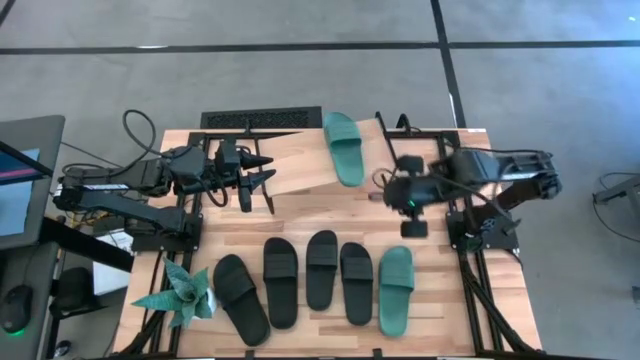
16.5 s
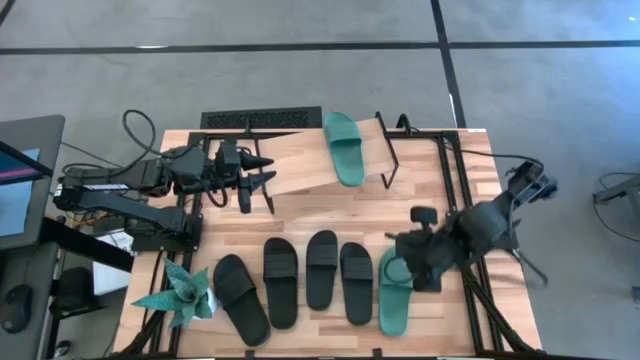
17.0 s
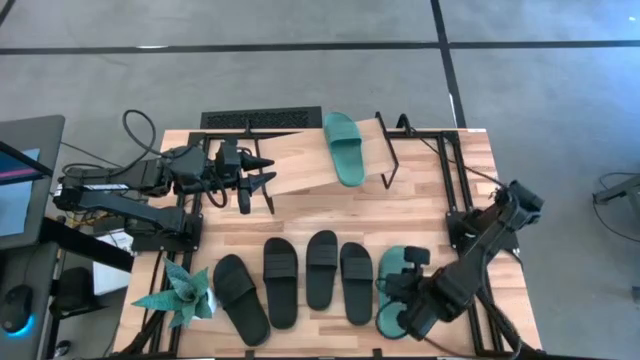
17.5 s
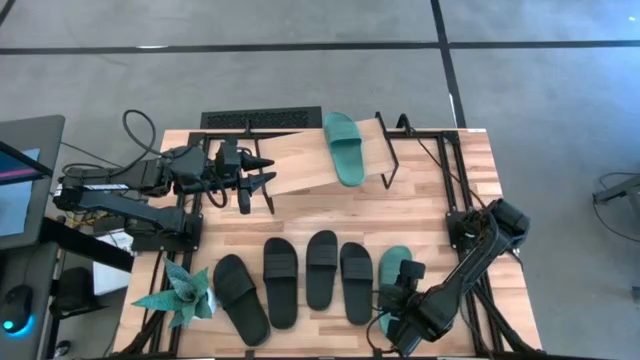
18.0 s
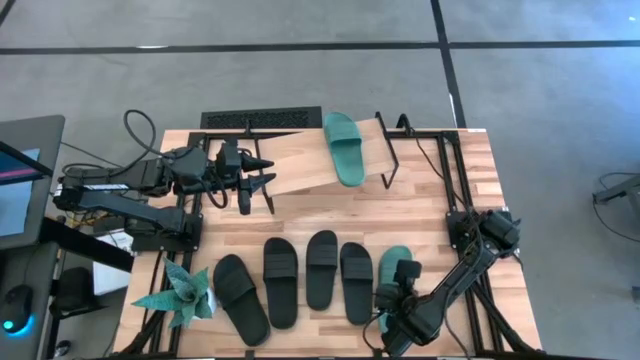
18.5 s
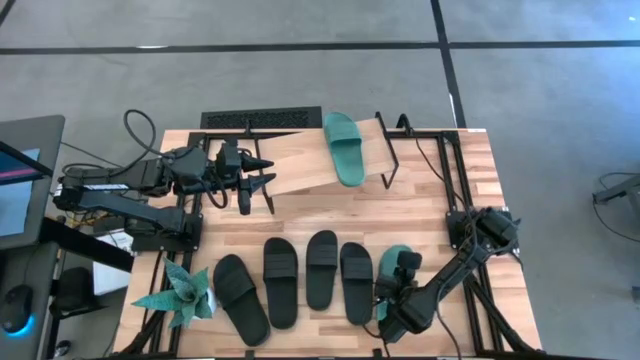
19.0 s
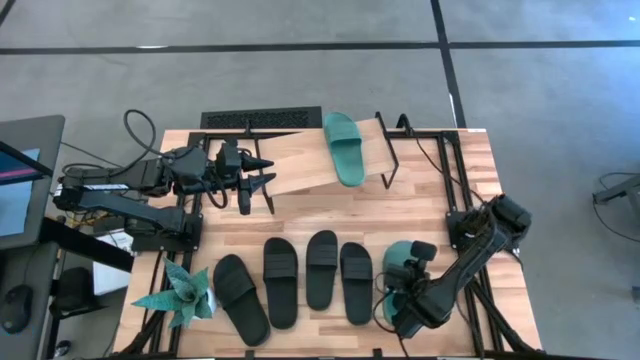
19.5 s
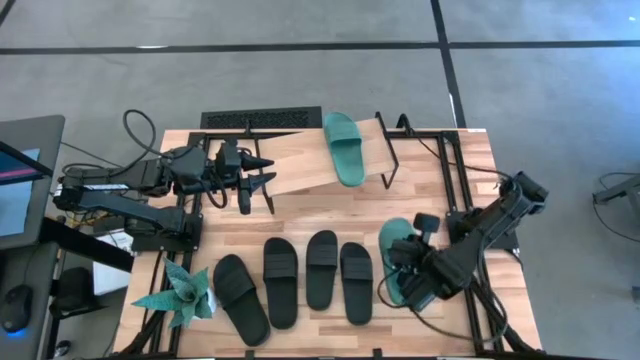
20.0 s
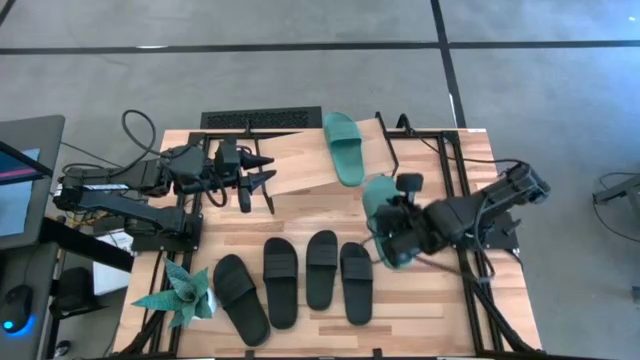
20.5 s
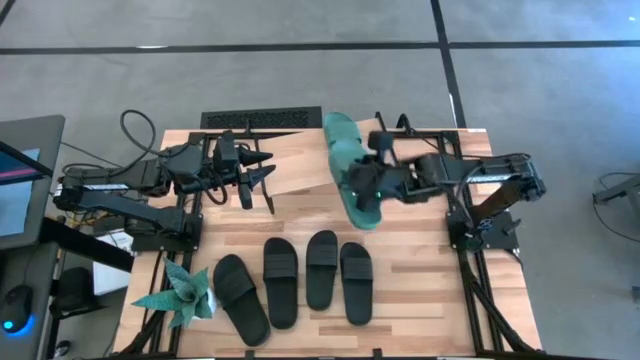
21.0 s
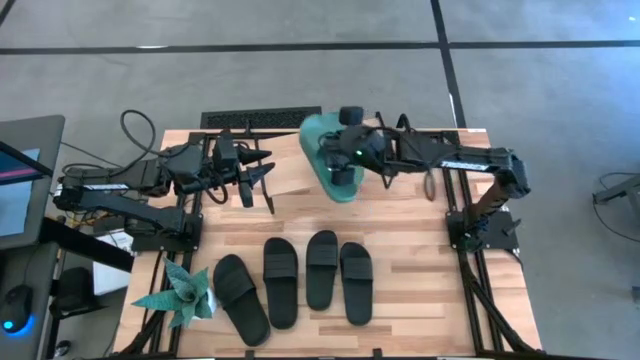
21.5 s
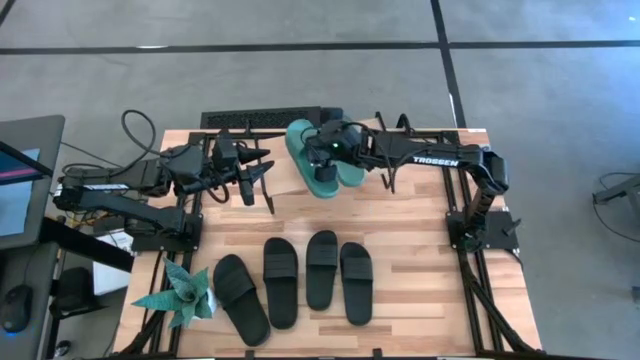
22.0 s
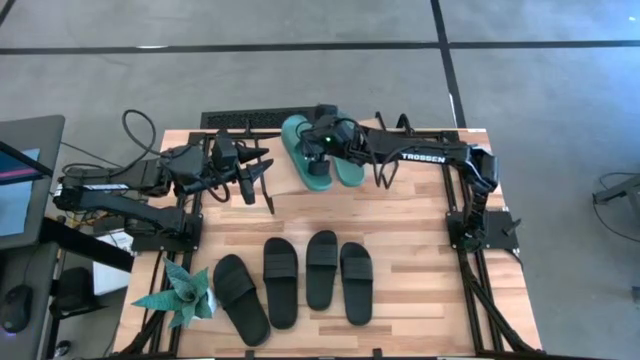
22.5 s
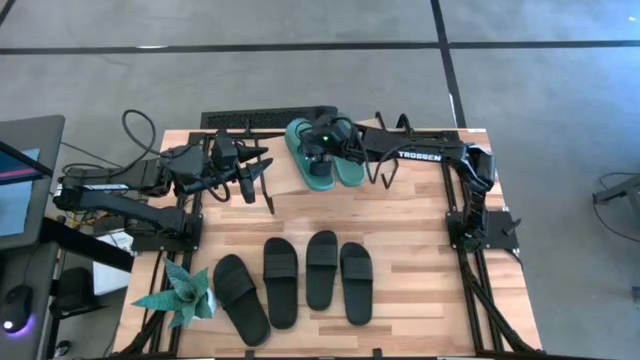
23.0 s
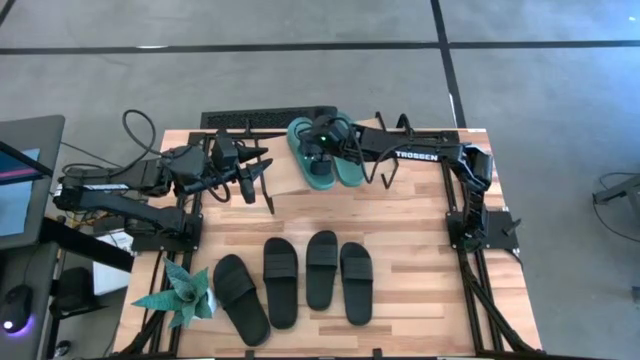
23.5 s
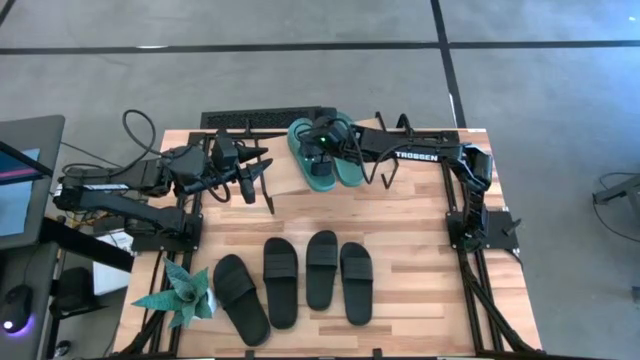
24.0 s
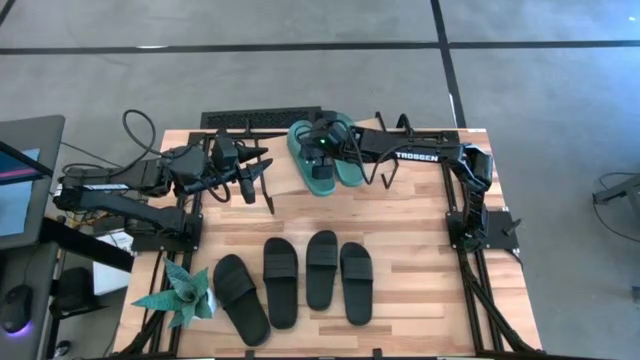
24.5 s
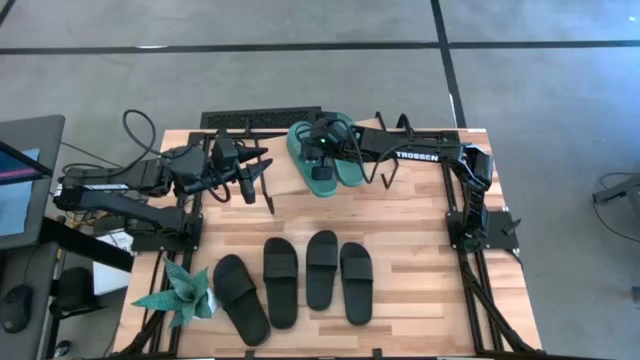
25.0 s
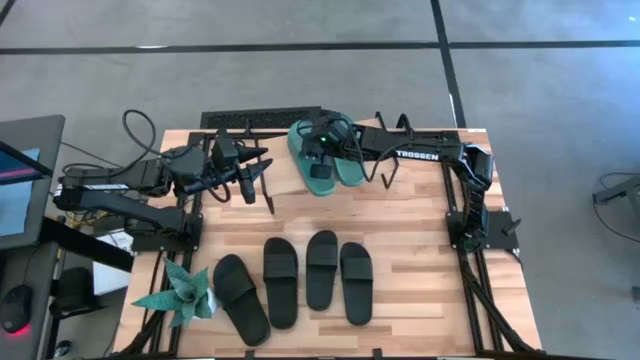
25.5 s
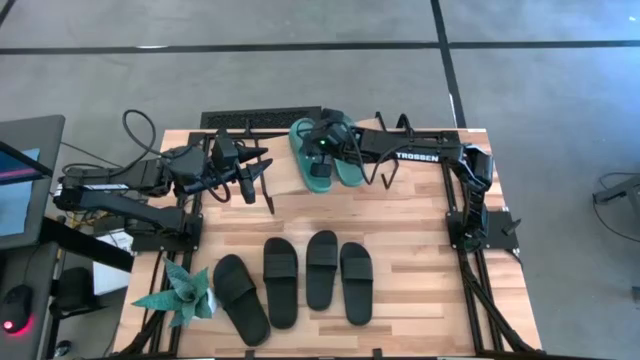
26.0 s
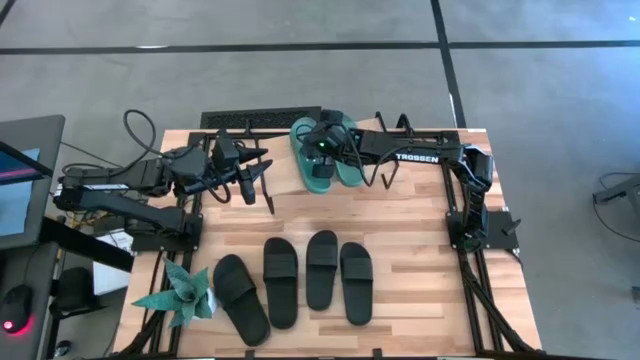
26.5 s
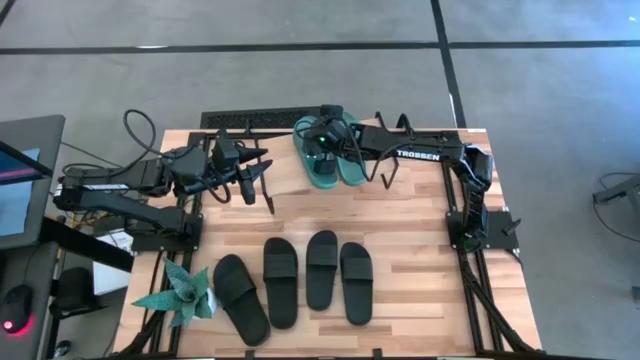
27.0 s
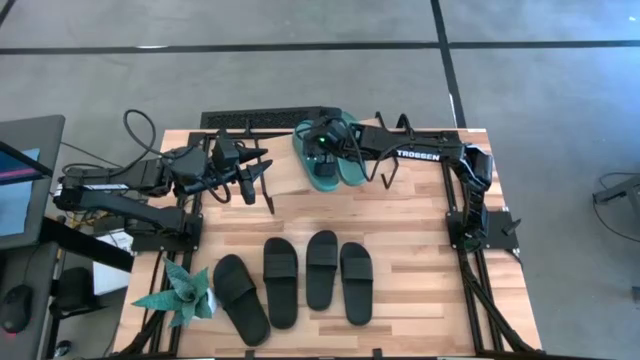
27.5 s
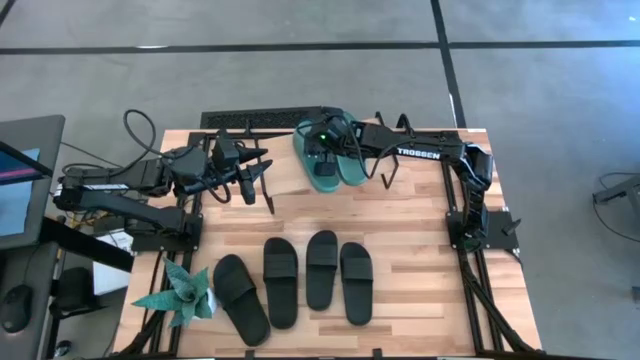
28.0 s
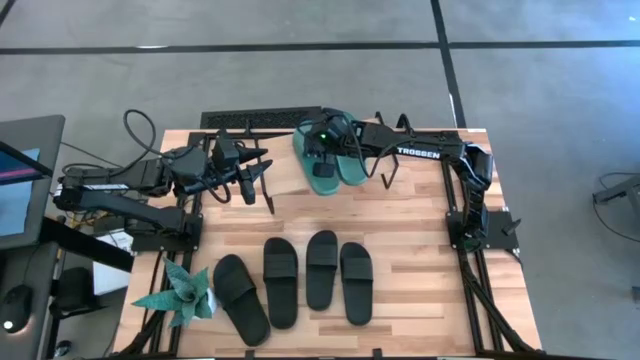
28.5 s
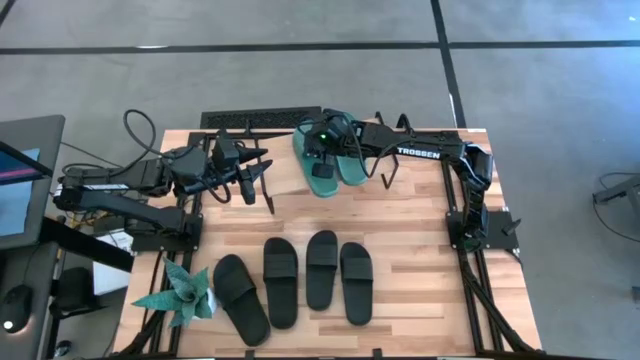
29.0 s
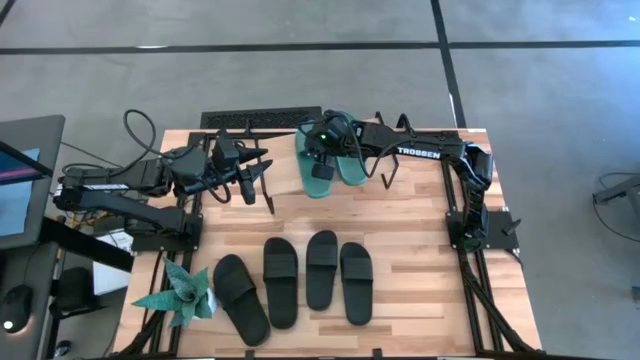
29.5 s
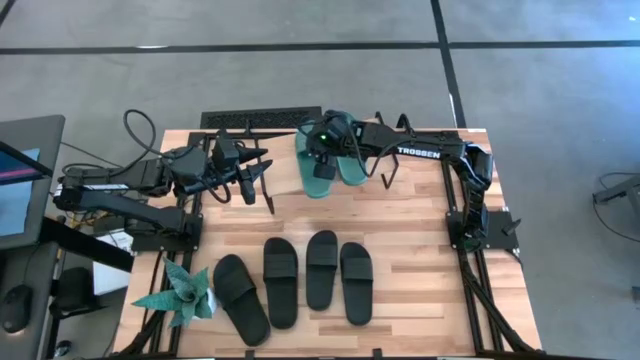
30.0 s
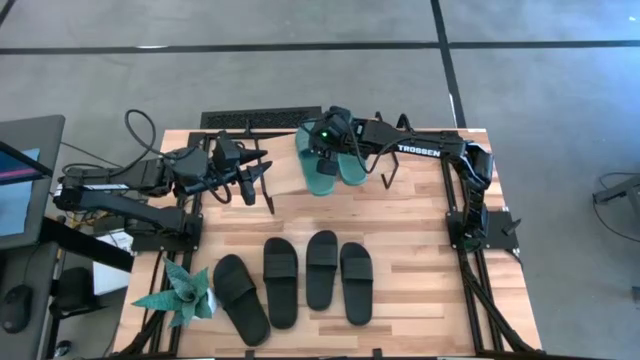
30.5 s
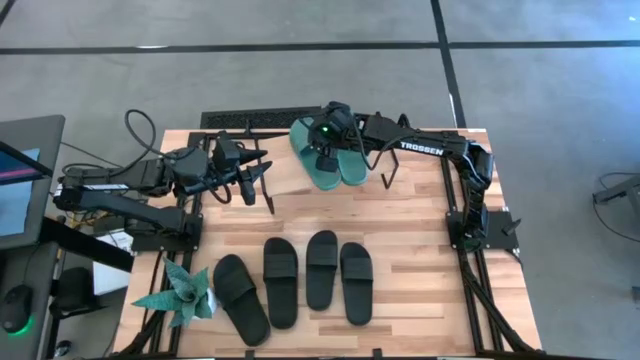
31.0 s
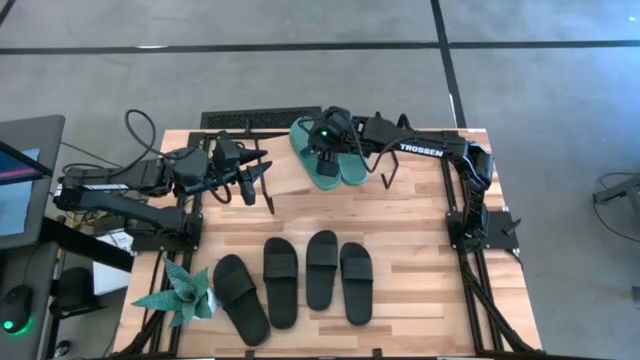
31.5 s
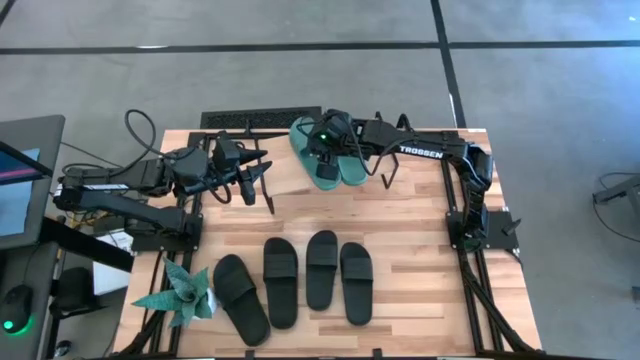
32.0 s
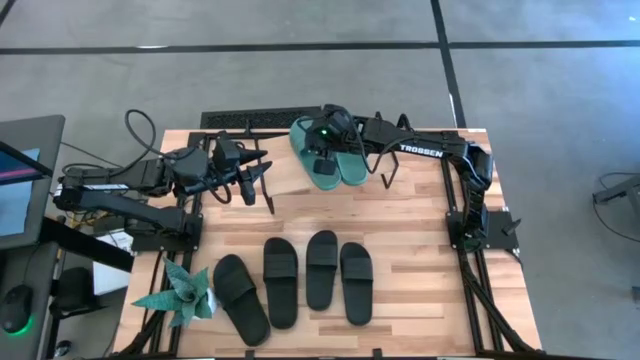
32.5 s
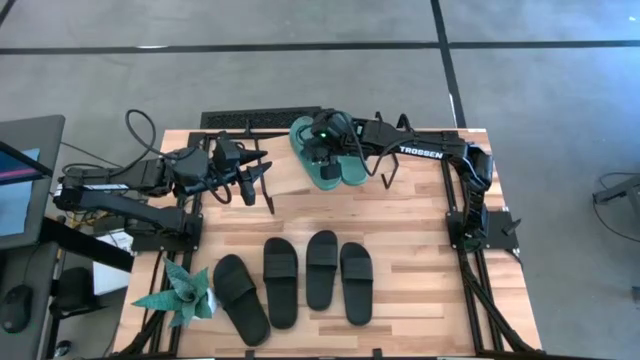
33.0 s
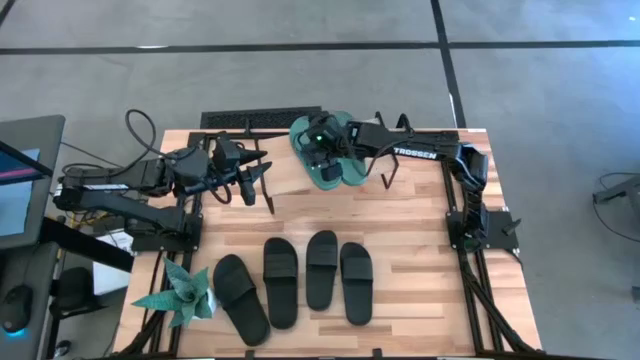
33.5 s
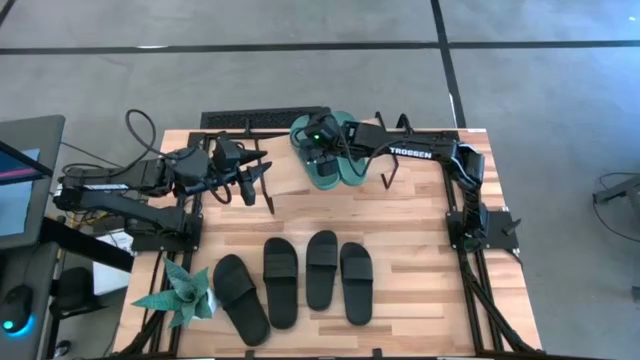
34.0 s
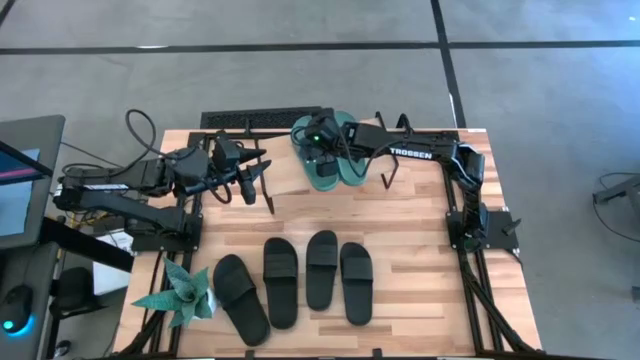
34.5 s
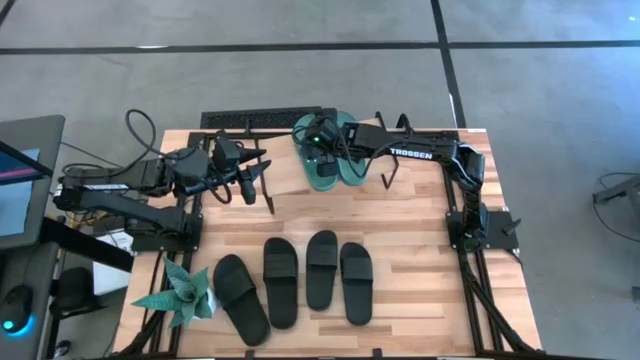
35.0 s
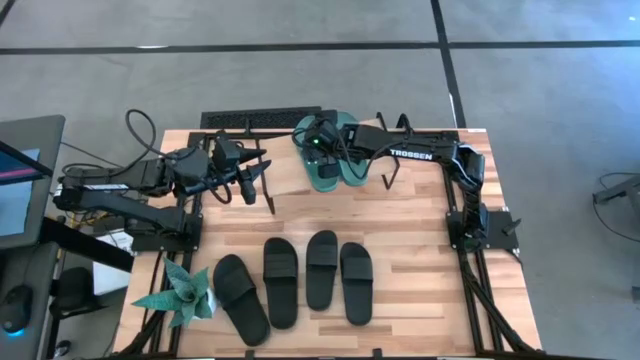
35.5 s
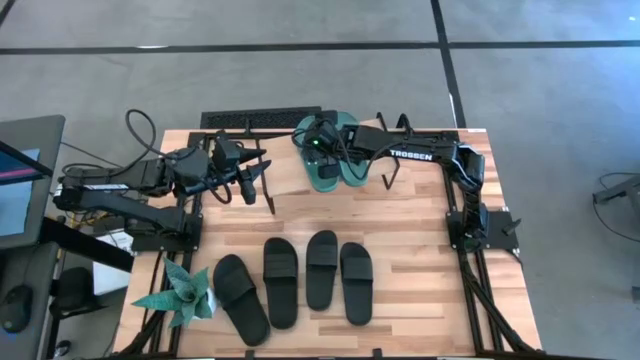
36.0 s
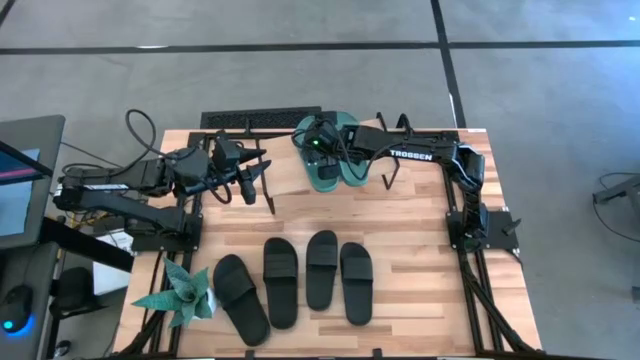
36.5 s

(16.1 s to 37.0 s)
Task: Pick and place slides into the shelf
Put the green slide on the shelf
